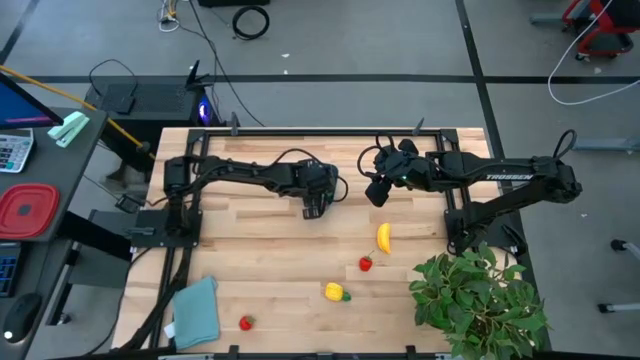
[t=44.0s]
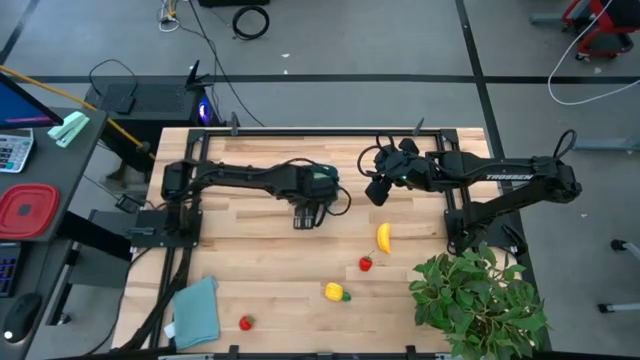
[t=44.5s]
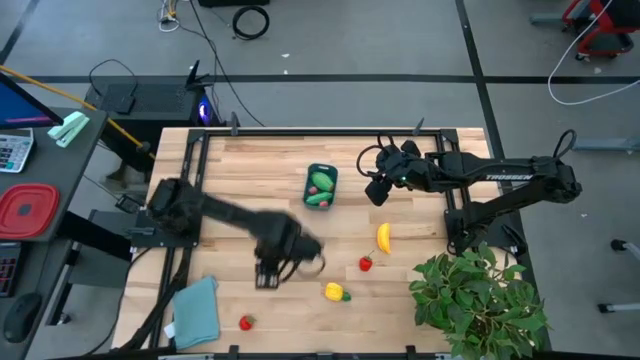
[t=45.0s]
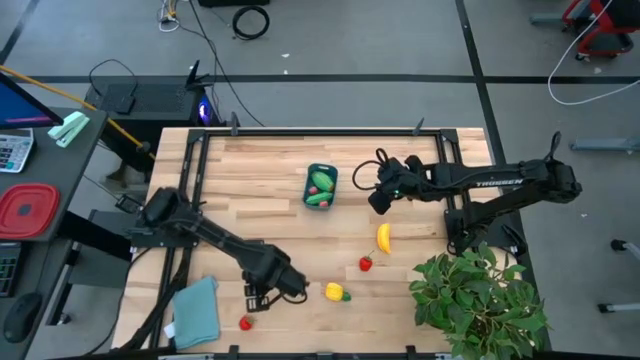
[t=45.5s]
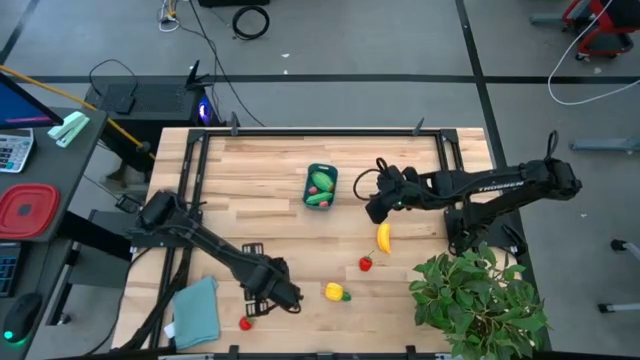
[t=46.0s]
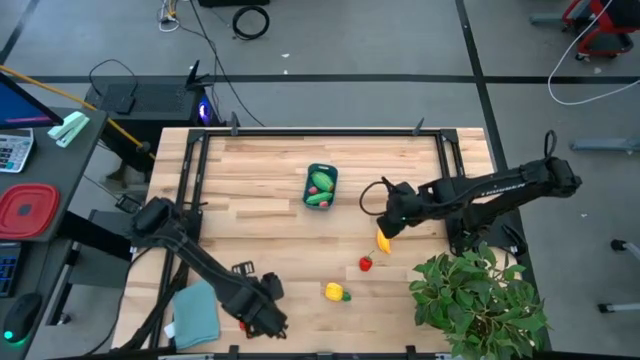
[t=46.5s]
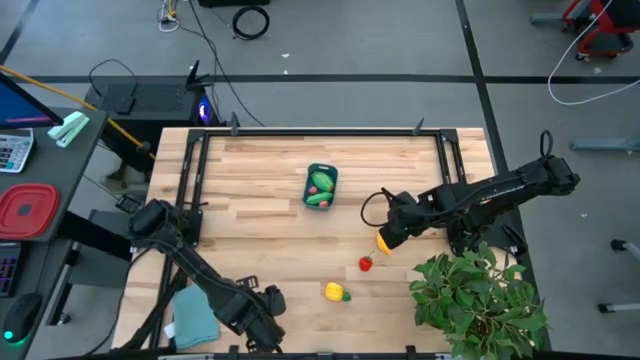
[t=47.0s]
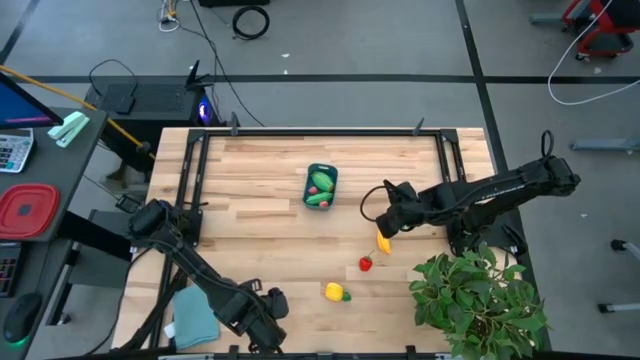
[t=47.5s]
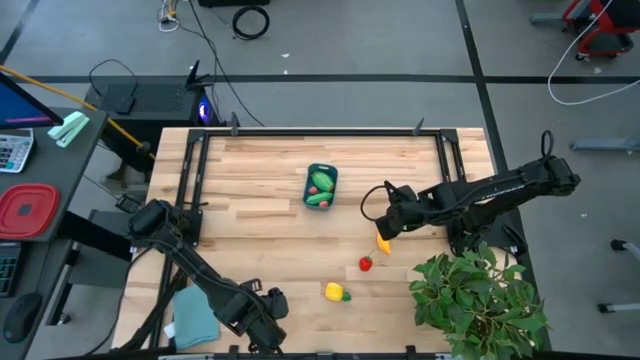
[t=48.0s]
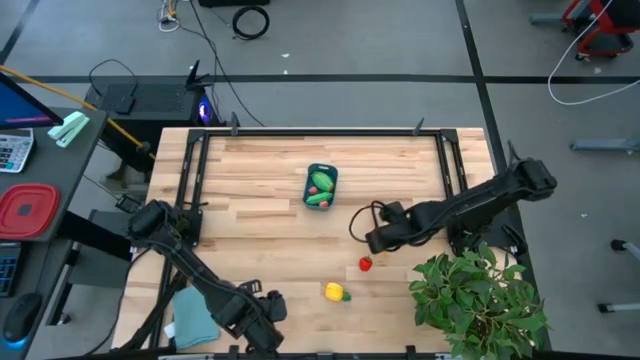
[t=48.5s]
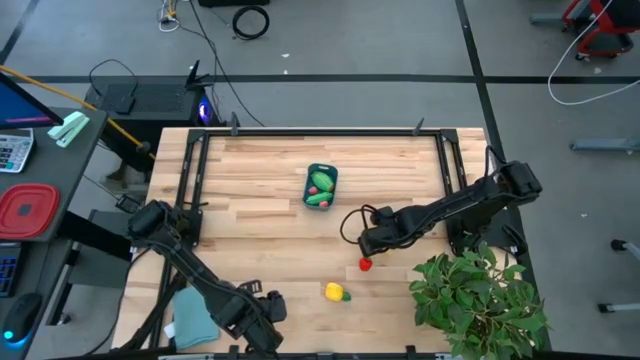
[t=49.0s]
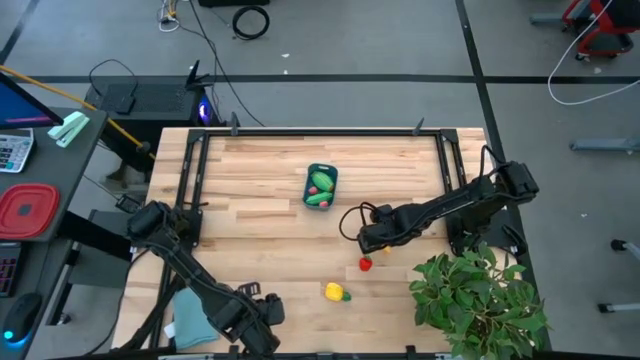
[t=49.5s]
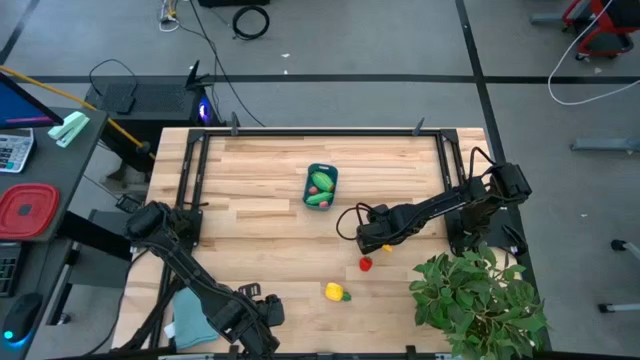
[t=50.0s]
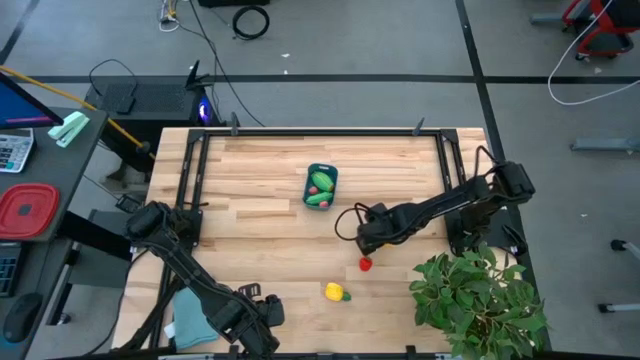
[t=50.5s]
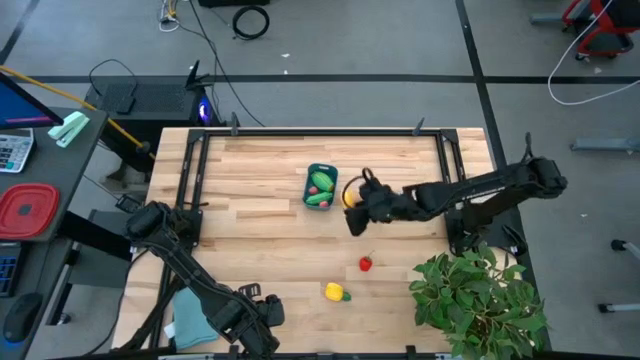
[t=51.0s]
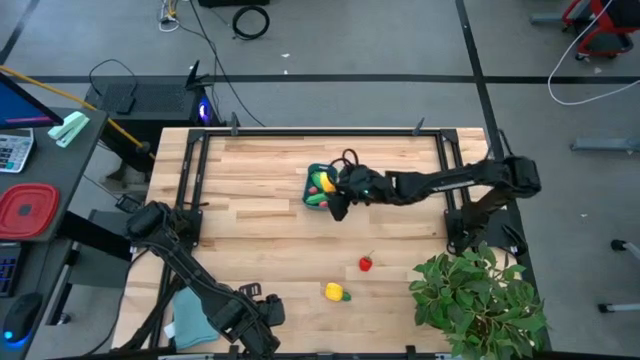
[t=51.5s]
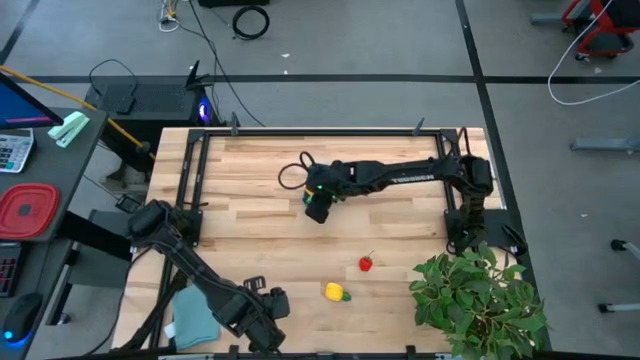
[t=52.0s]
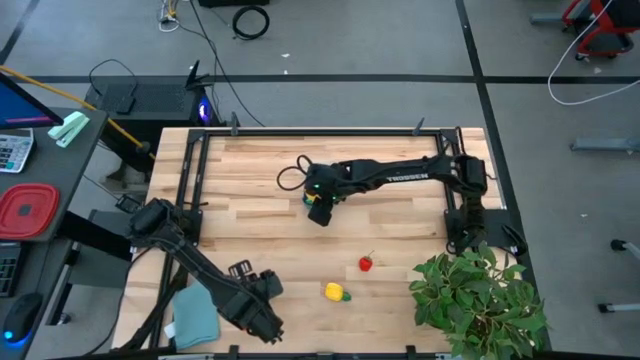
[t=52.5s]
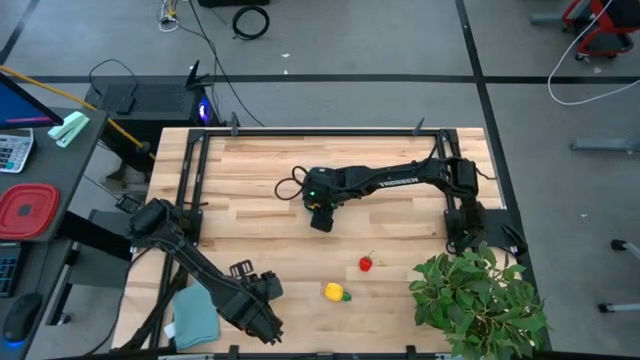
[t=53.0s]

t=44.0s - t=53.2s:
Task: Pick and placing Produce into tupperware
Put the yellow banana into the blue bin

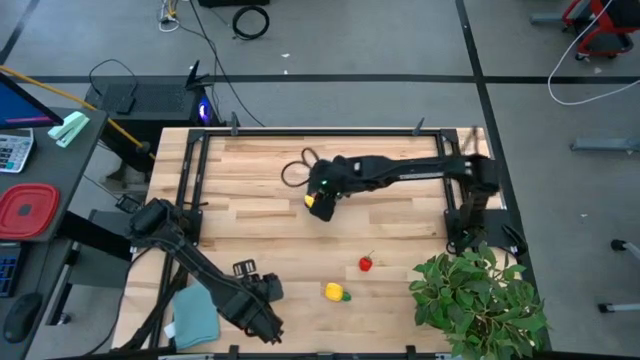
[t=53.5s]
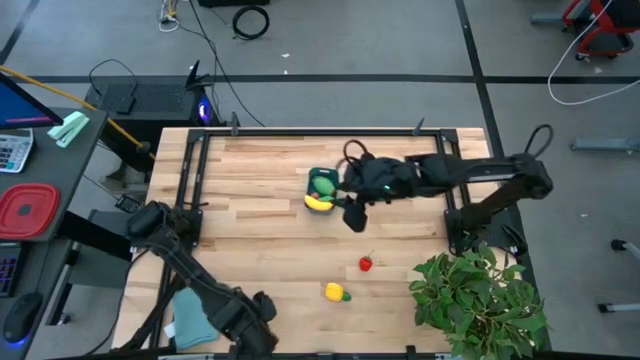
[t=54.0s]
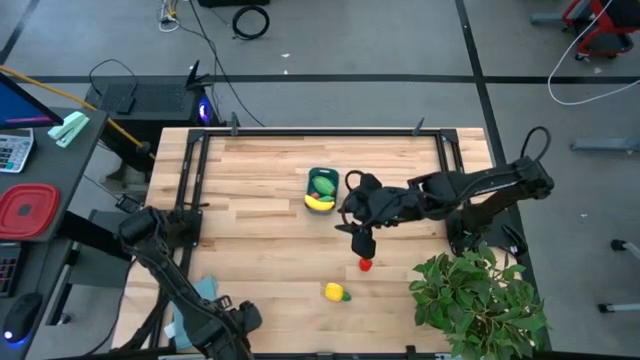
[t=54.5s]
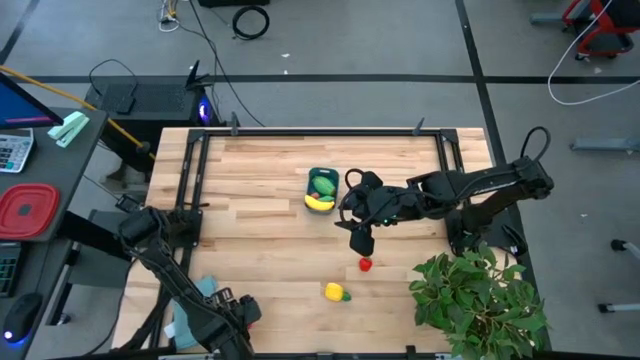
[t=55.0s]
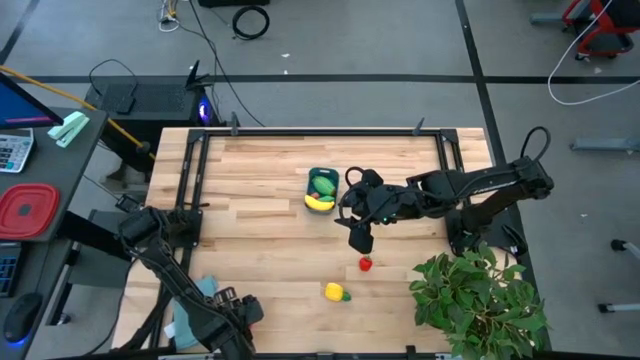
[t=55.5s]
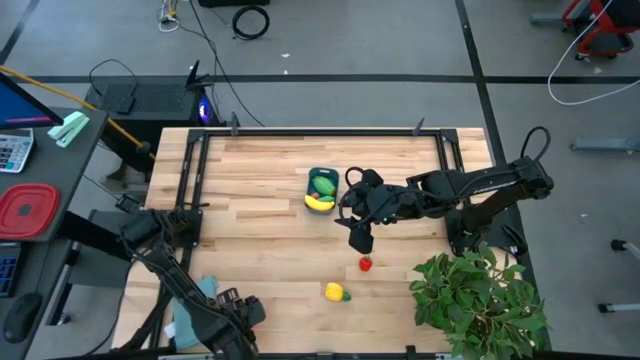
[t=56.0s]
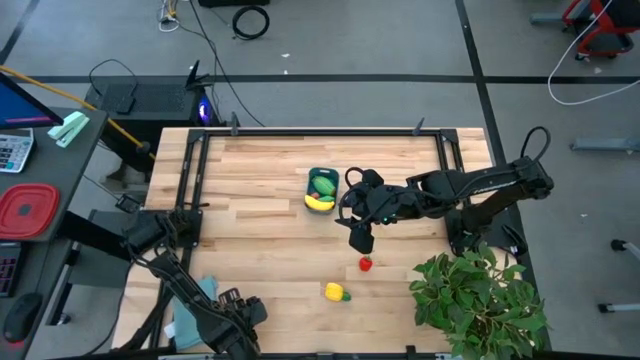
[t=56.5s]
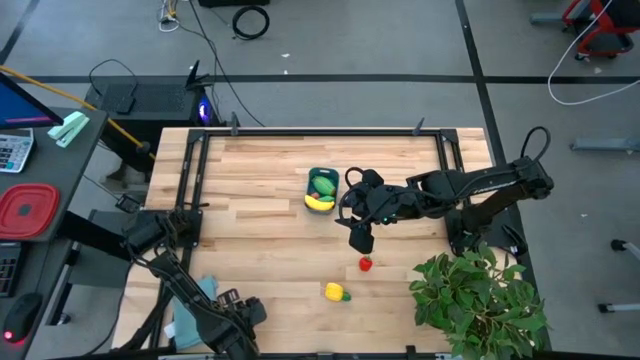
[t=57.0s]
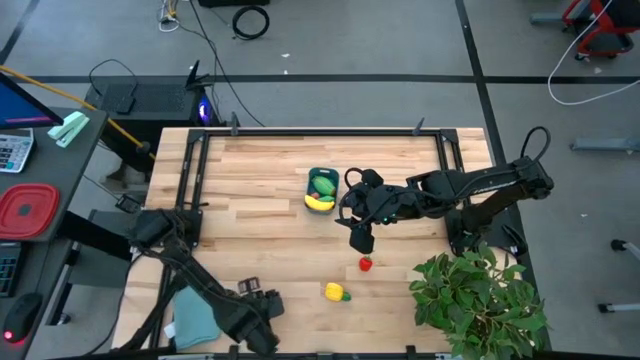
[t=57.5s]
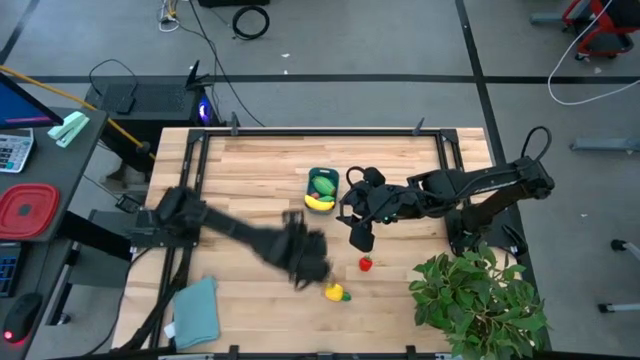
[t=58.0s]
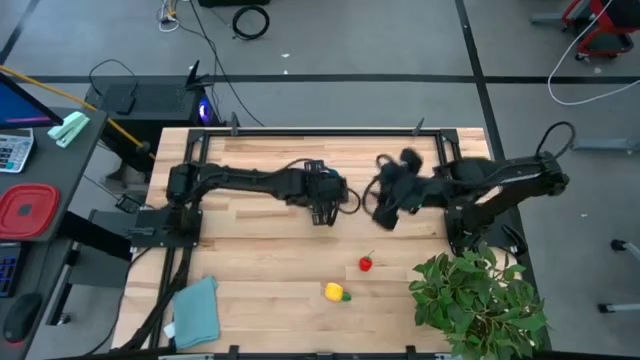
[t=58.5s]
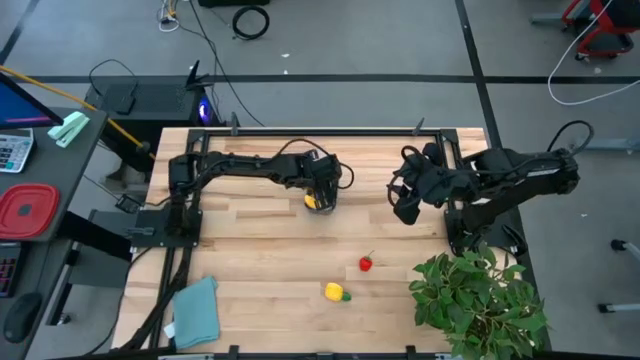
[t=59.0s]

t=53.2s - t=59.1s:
Put the bottom red strawberry into the blue bin

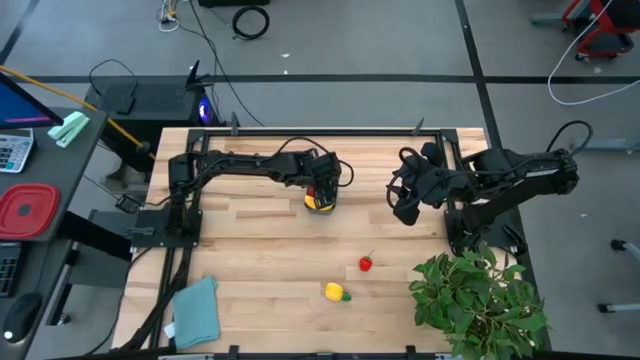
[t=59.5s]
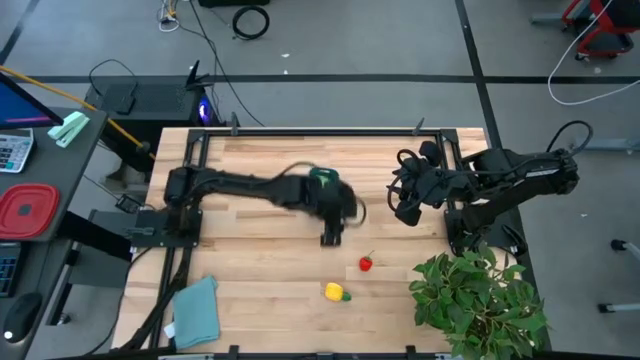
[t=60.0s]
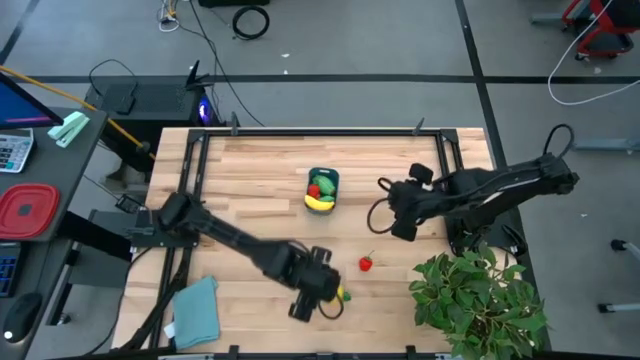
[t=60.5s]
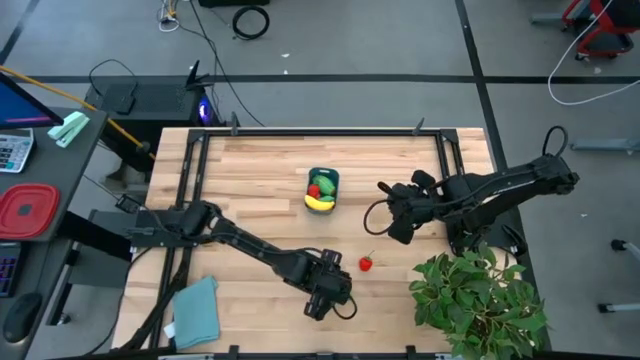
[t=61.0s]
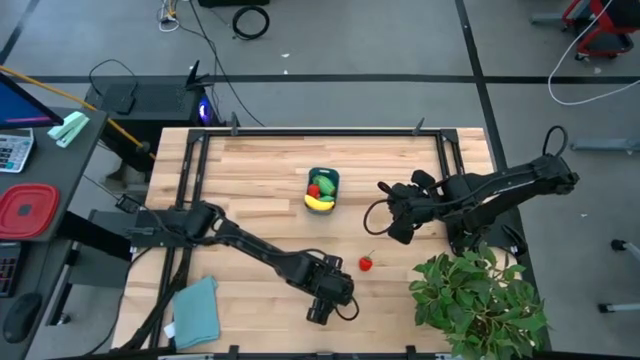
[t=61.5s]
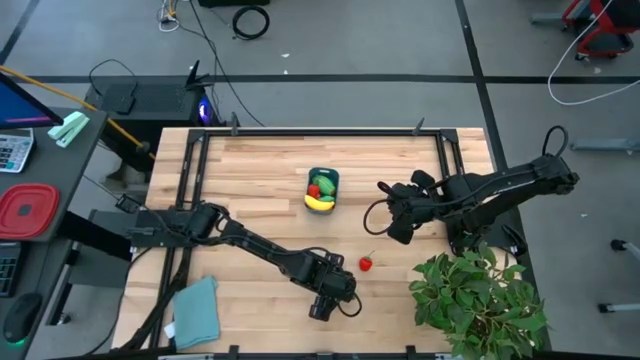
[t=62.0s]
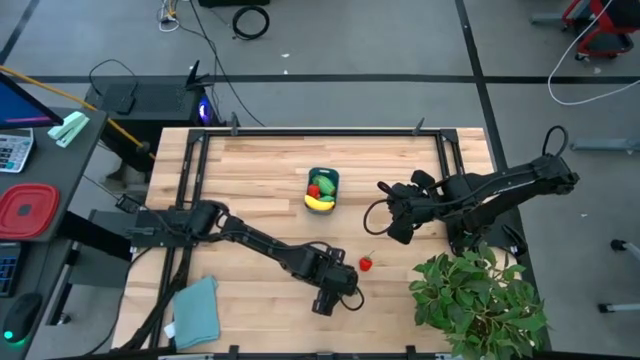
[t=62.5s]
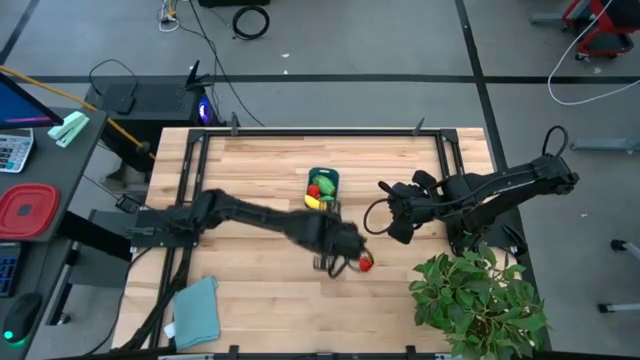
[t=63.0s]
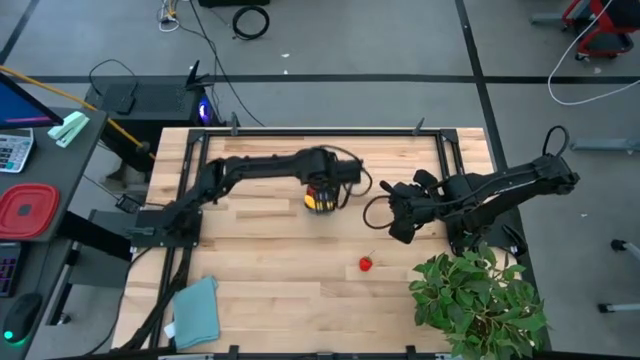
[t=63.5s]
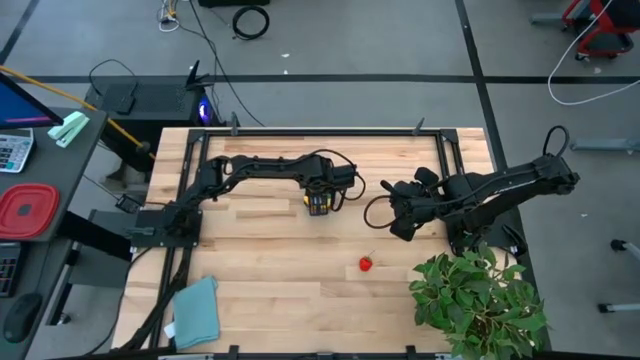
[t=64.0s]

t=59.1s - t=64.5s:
Put the yellow pineapple into the blue bin

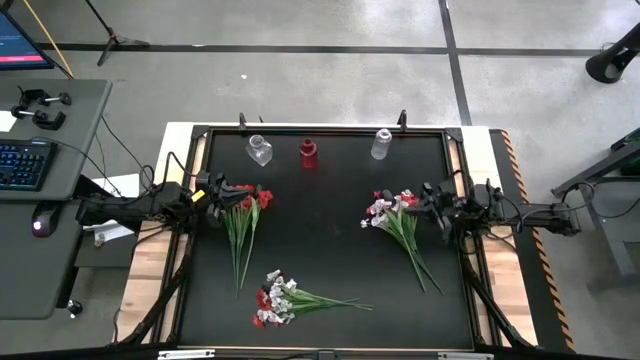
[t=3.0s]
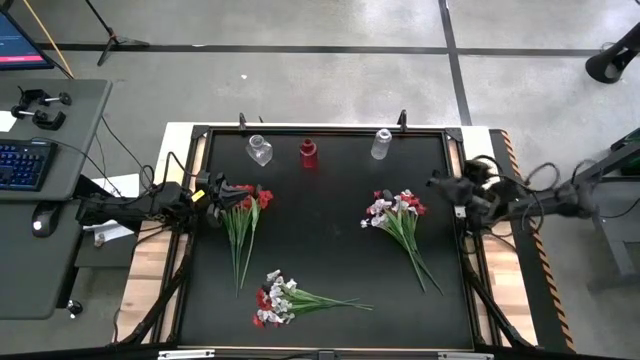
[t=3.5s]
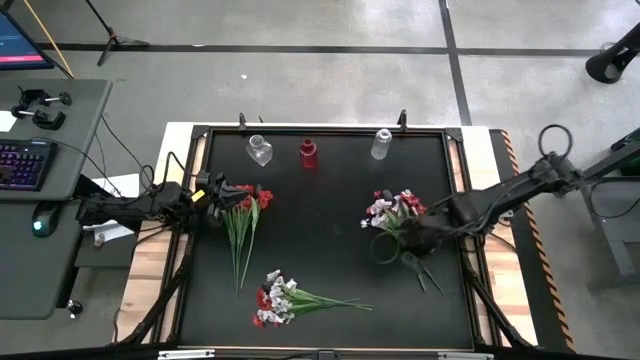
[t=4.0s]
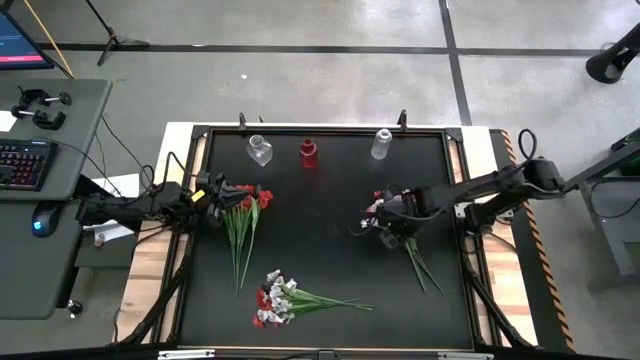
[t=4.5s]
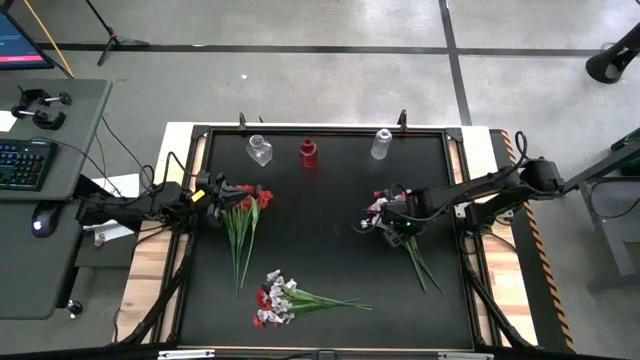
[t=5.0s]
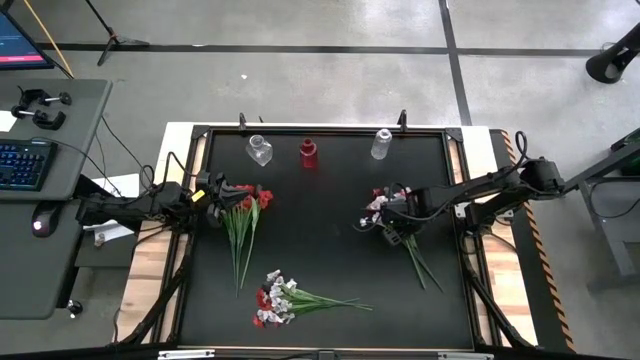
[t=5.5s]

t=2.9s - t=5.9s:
Task: Sort flowers into vase by color
Put the top right black flower into the right transparent flower vase
